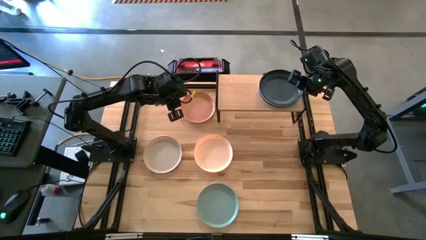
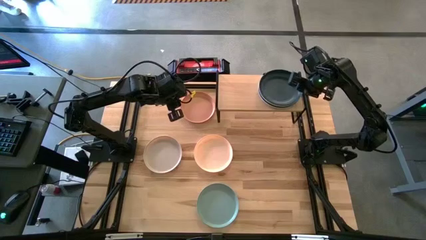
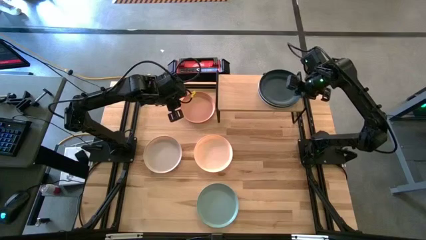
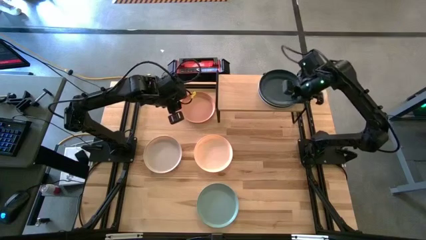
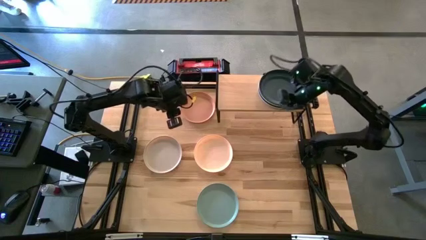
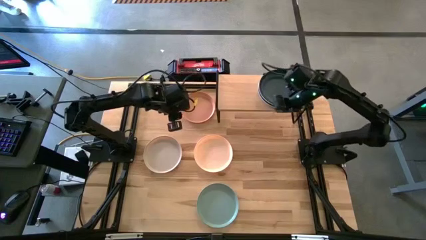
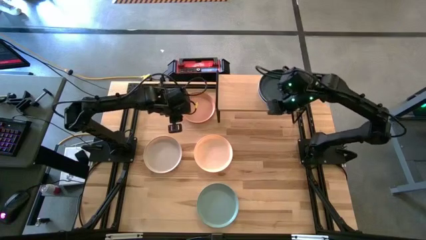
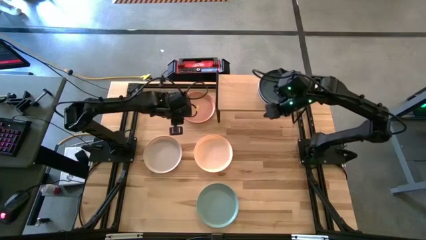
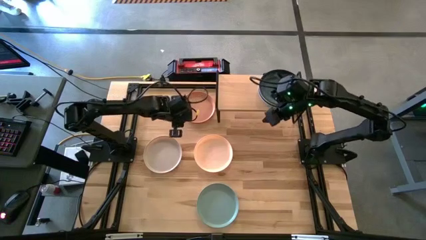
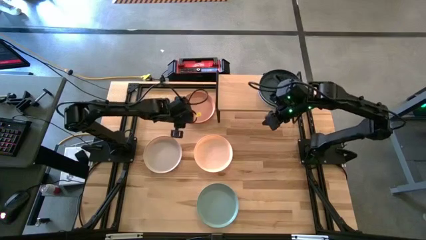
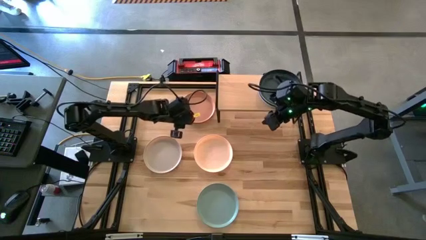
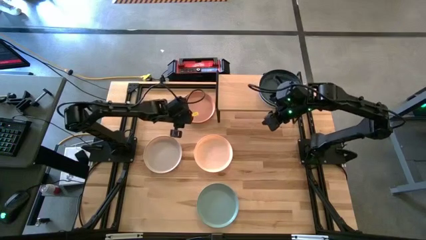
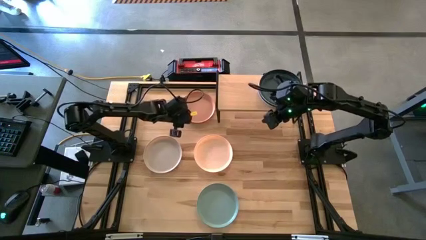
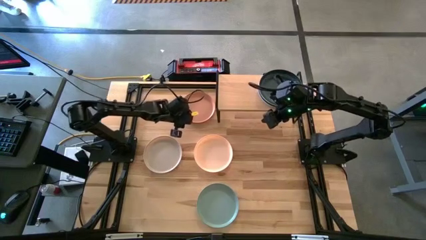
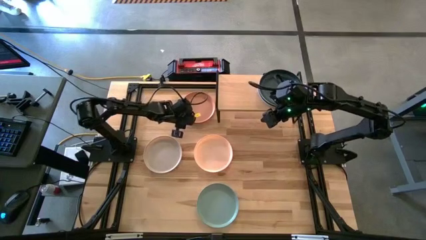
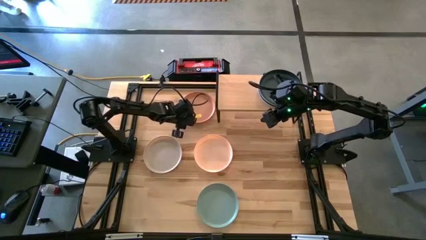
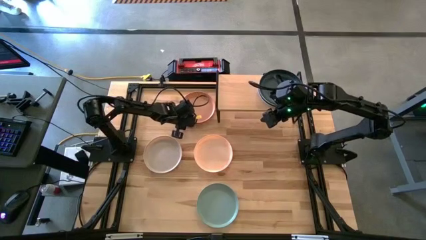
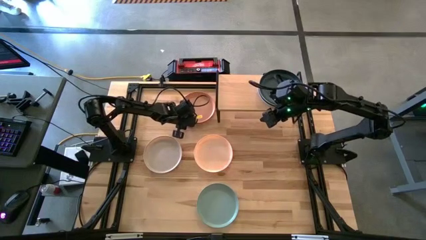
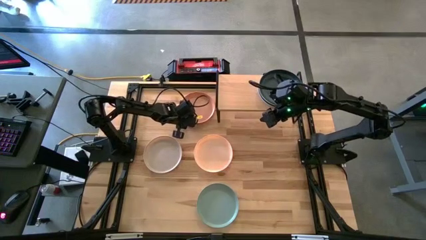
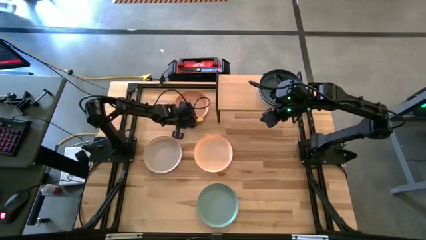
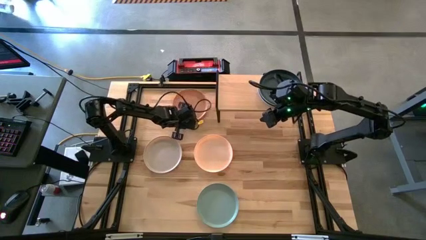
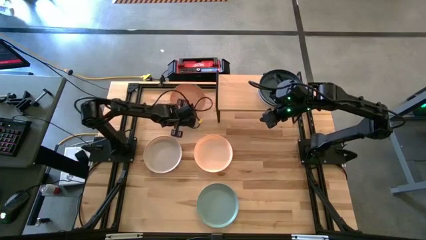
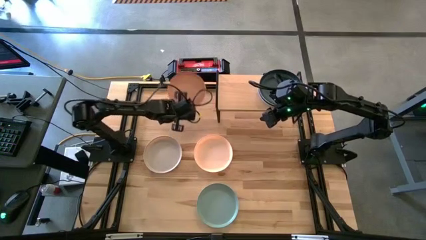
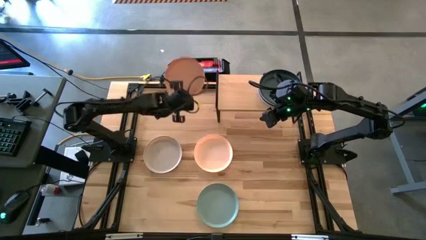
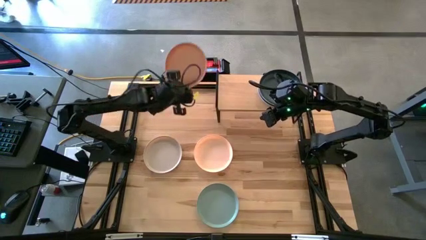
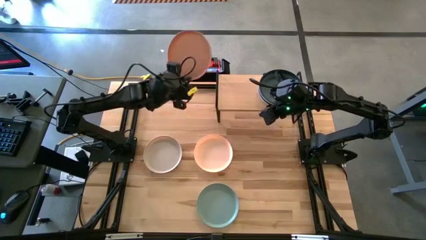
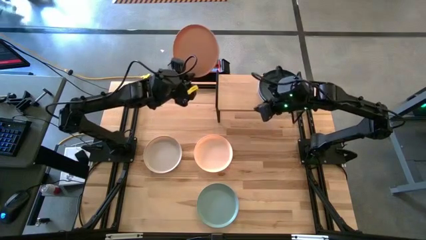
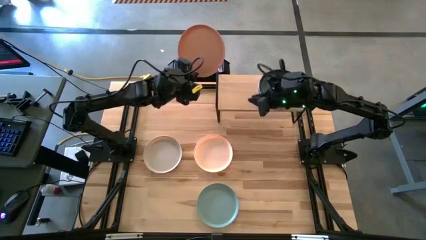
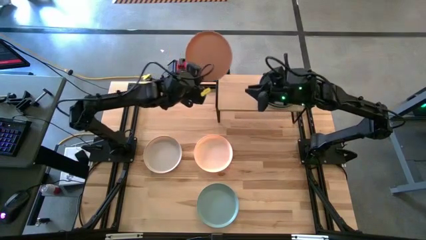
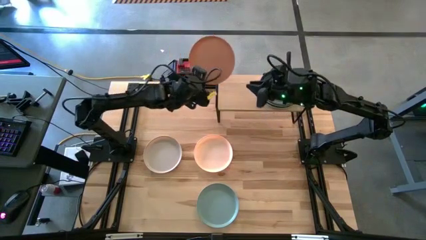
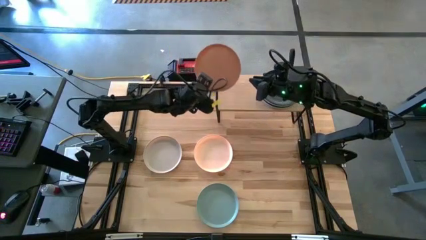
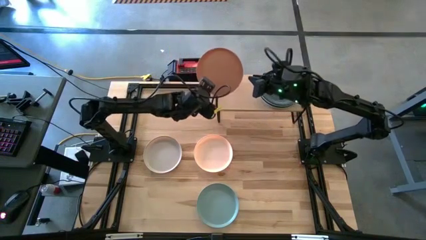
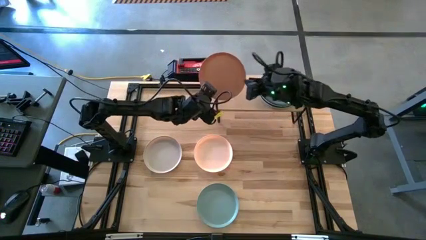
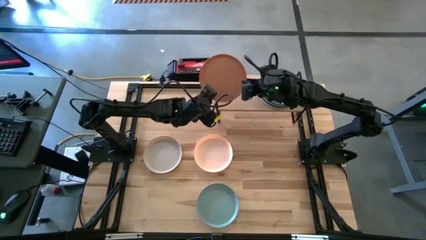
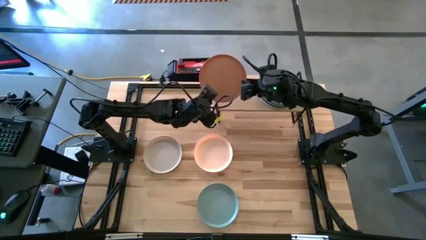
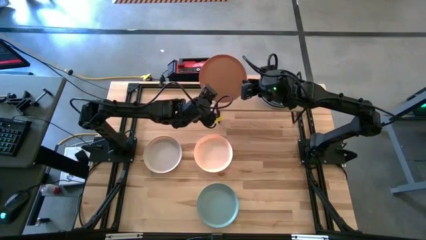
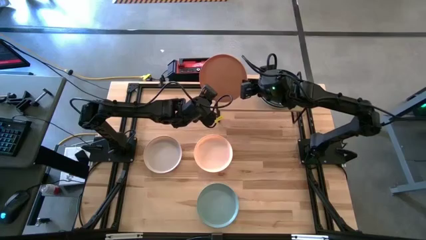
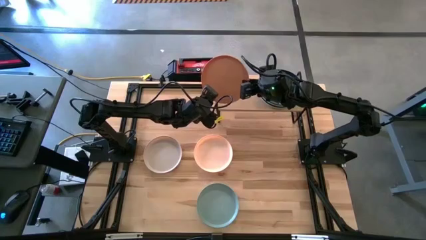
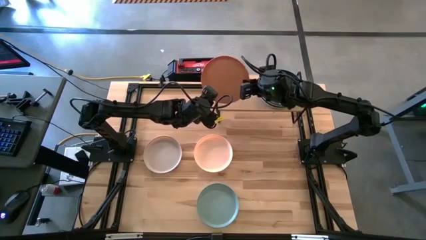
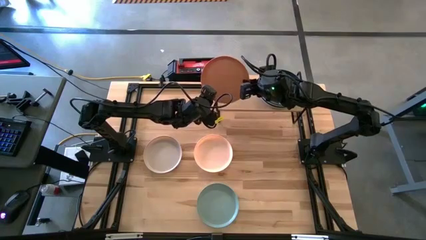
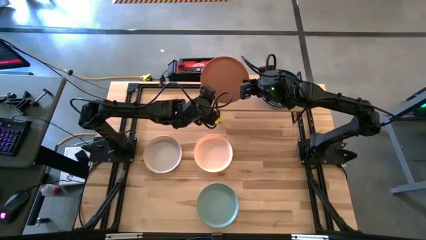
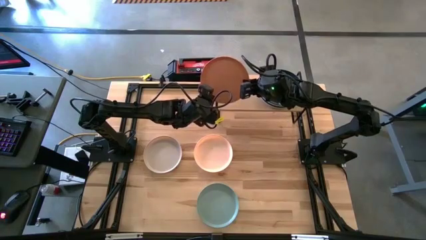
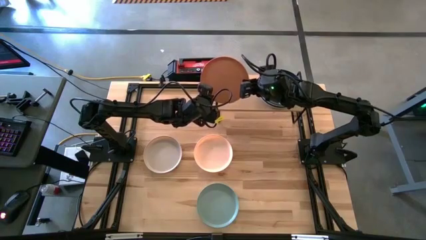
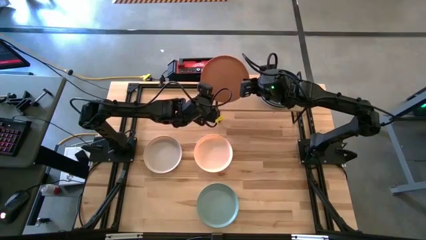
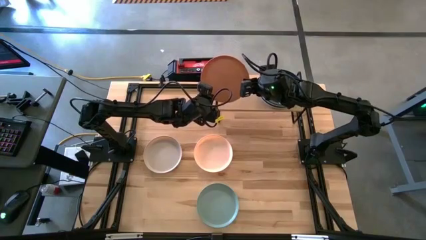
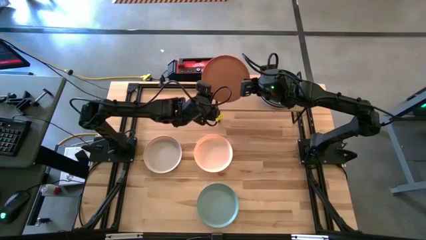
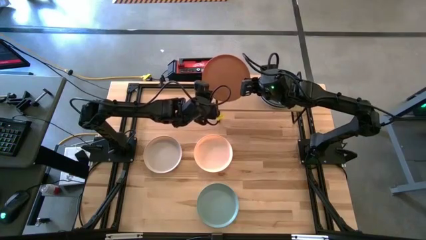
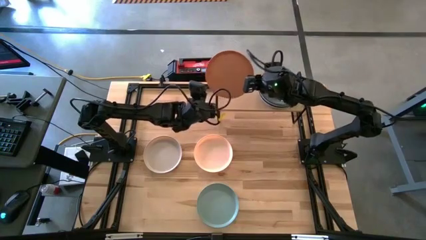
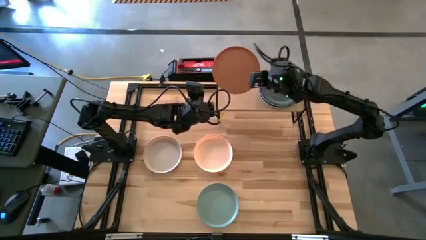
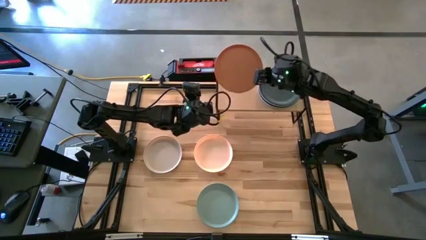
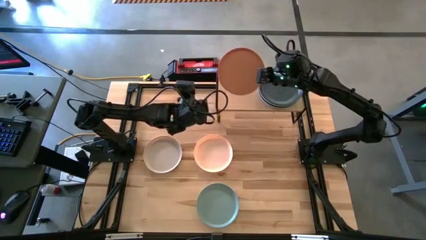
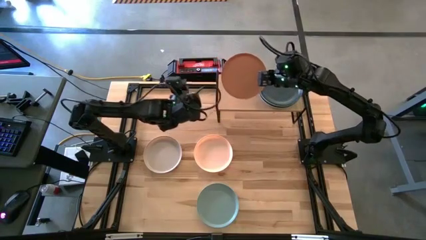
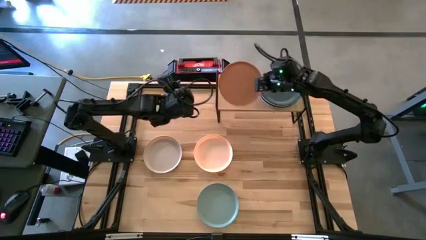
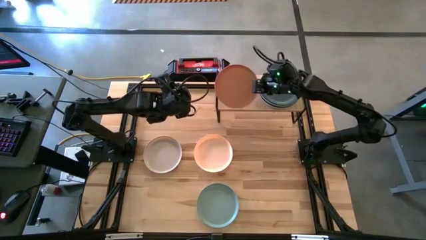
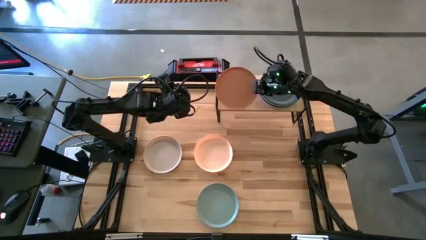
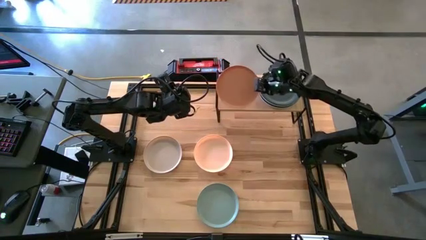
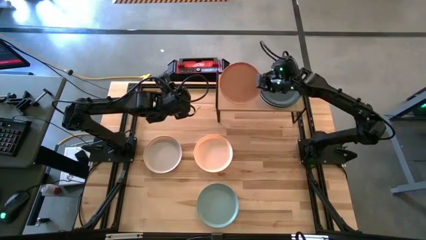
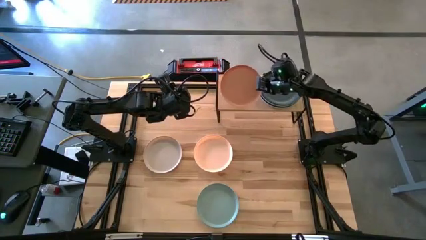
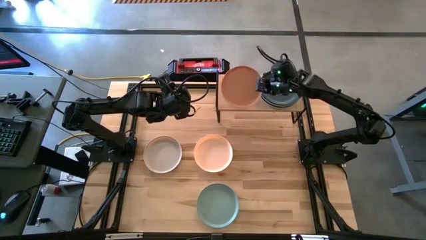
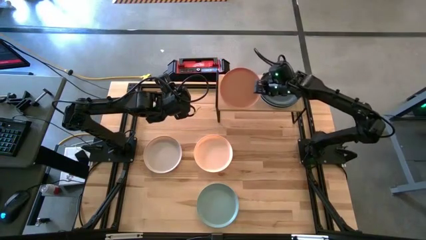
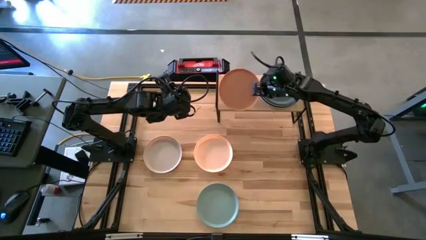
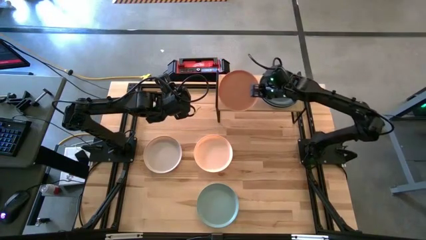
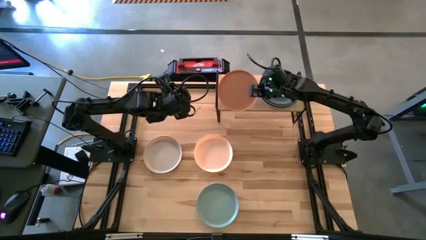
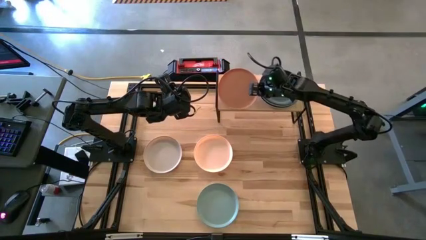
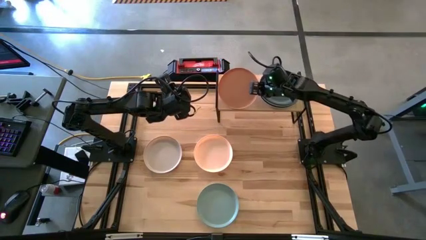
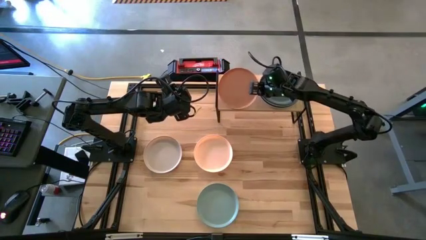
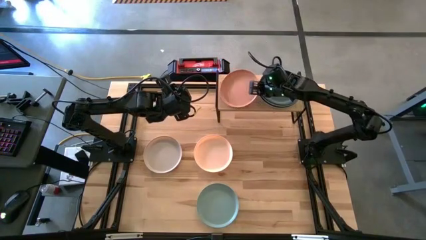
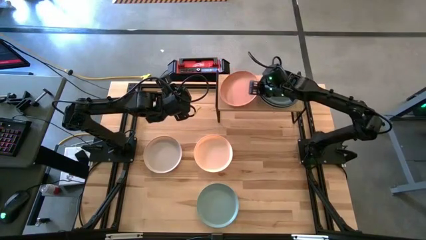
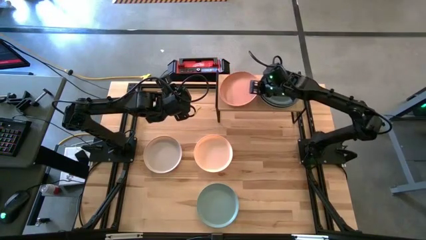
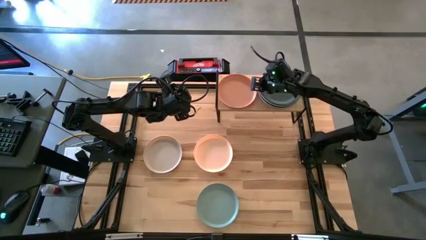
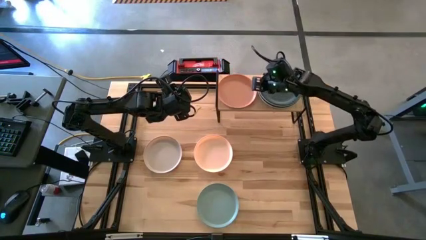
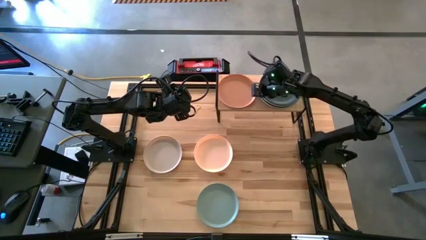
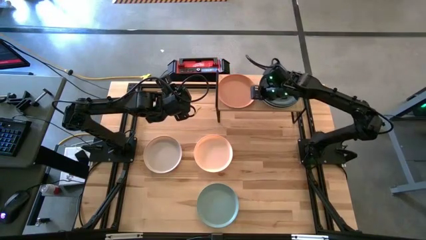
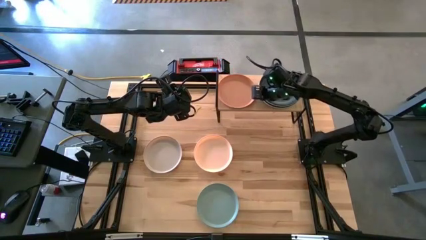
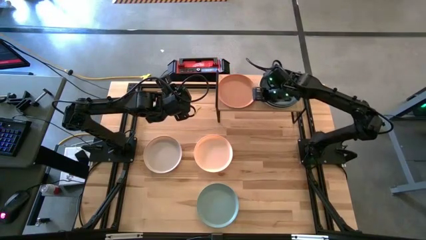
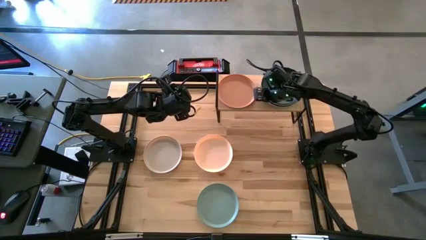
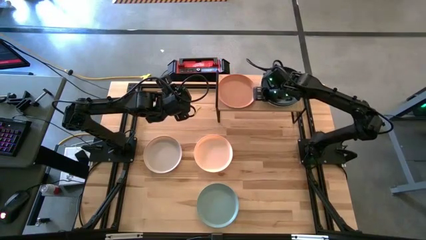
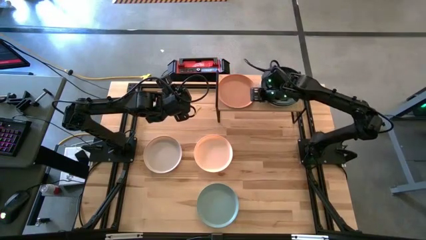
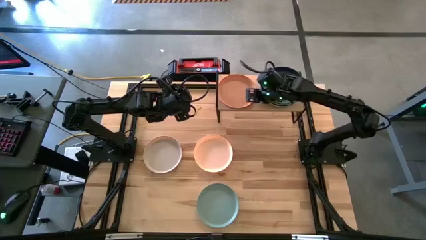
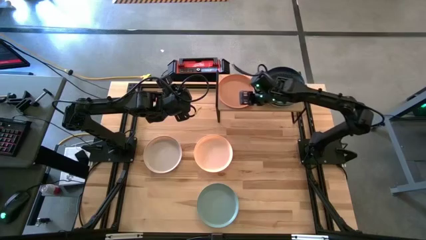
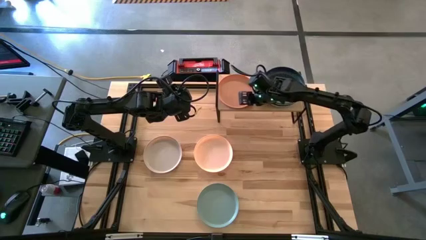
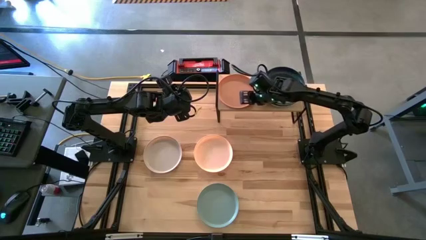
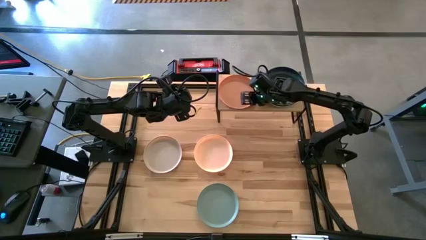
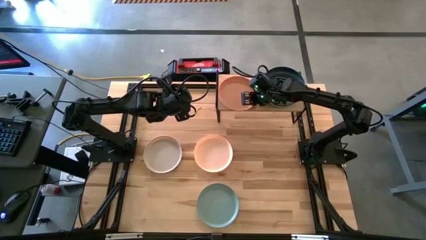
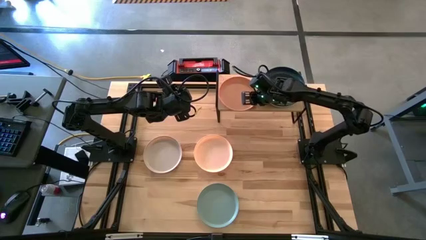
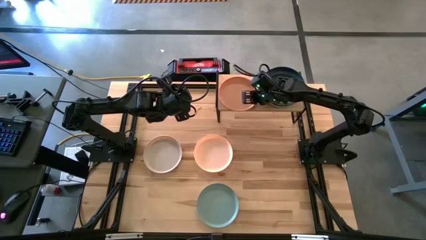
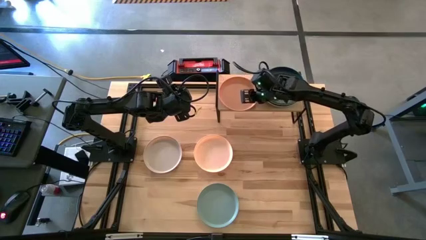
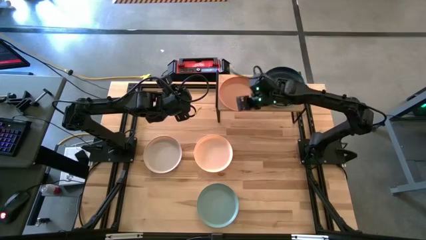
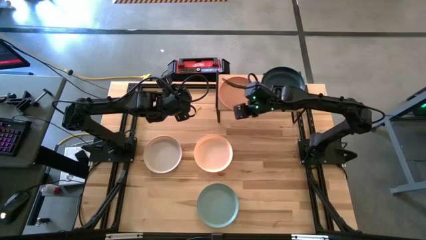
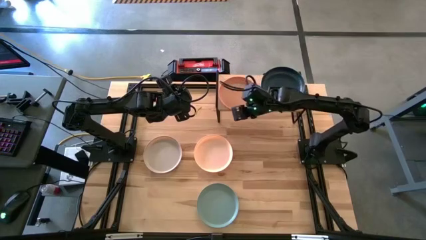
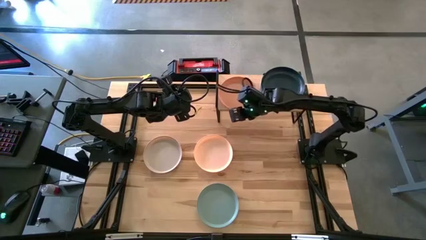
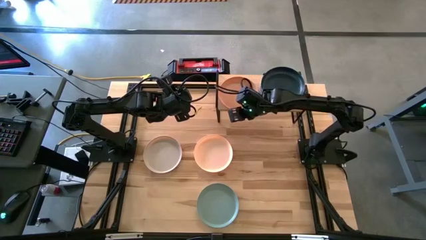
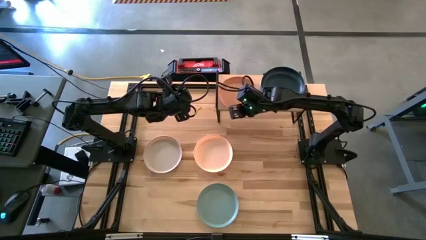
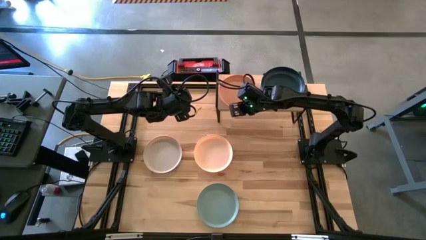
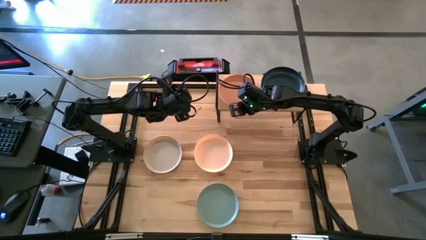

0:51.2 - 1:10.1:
Task: Place and stack plates onto a shelf
Put the orange plate on the shelf
